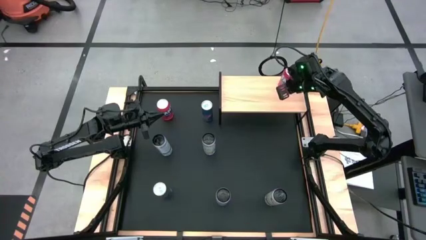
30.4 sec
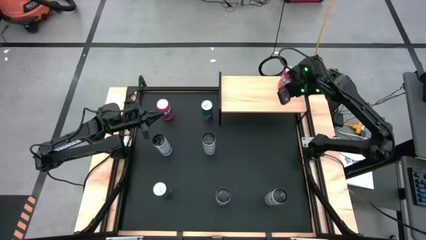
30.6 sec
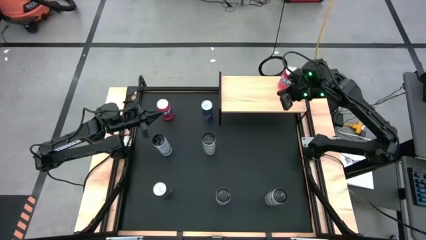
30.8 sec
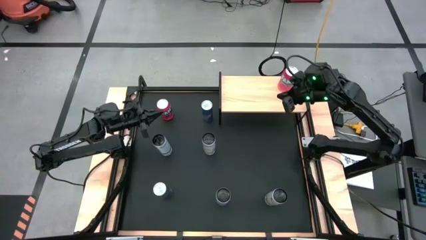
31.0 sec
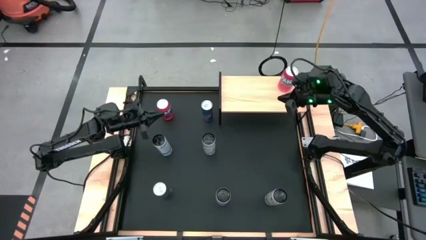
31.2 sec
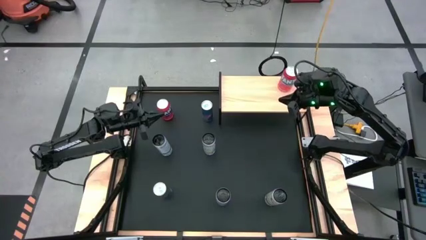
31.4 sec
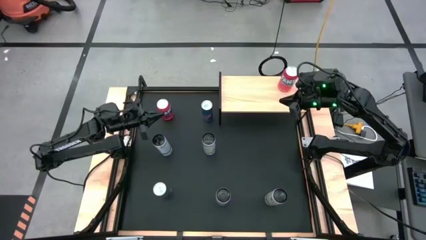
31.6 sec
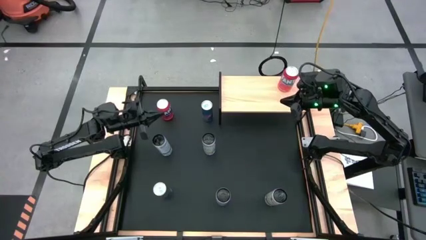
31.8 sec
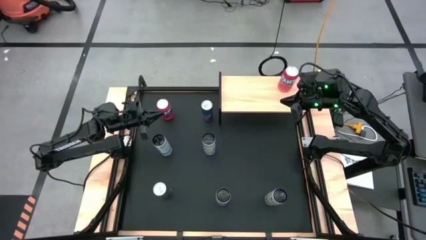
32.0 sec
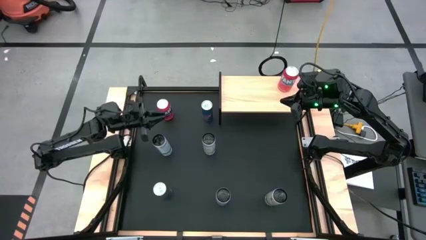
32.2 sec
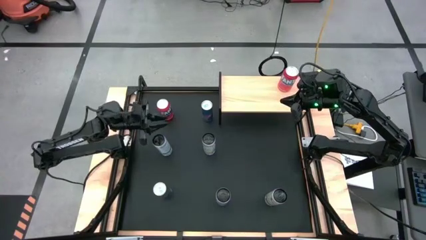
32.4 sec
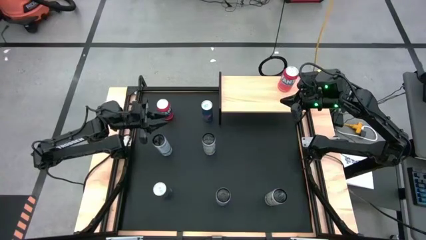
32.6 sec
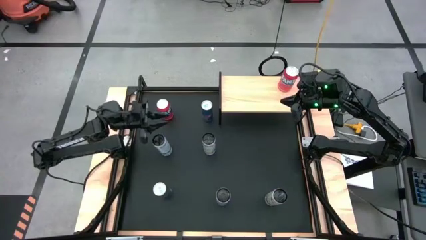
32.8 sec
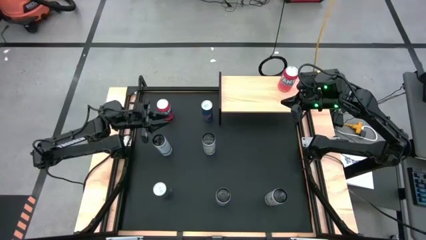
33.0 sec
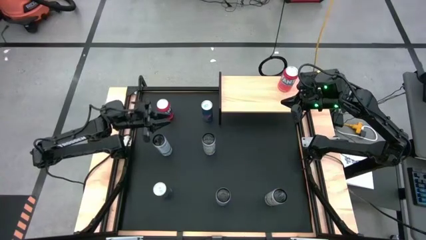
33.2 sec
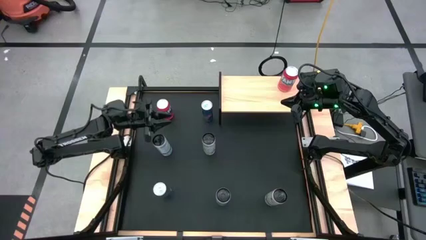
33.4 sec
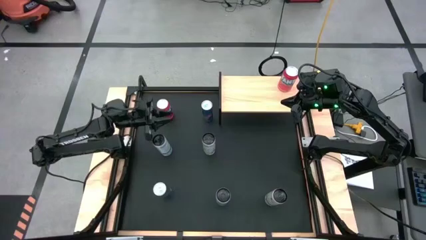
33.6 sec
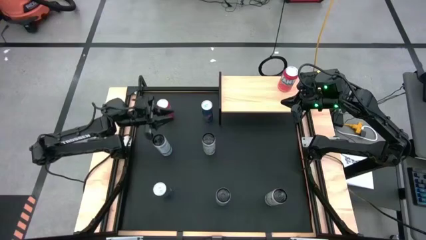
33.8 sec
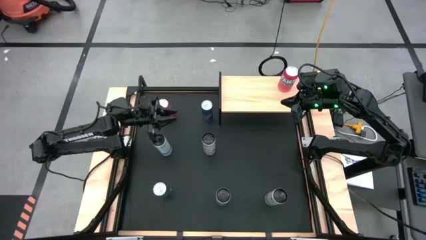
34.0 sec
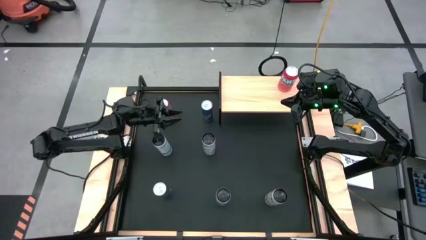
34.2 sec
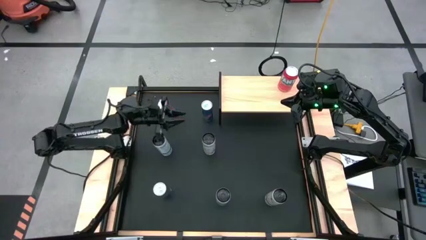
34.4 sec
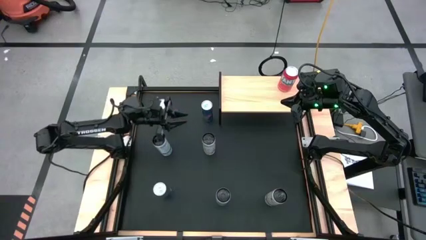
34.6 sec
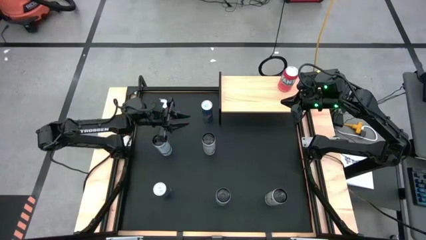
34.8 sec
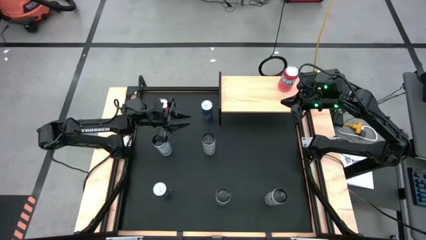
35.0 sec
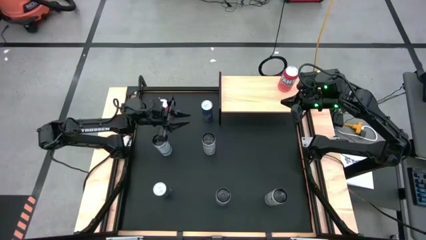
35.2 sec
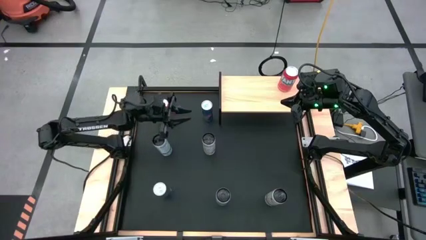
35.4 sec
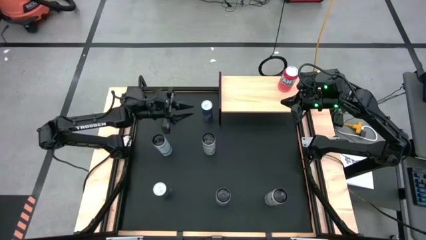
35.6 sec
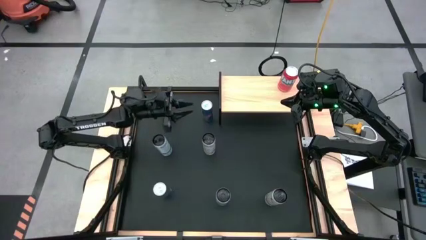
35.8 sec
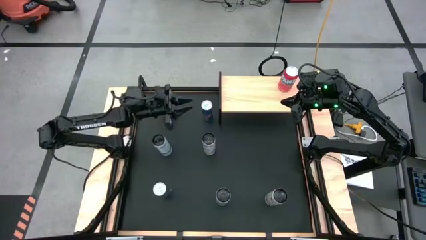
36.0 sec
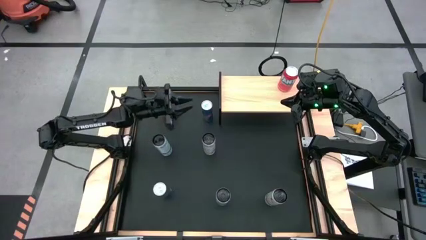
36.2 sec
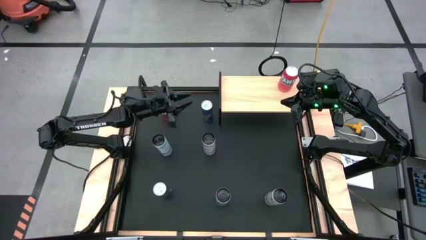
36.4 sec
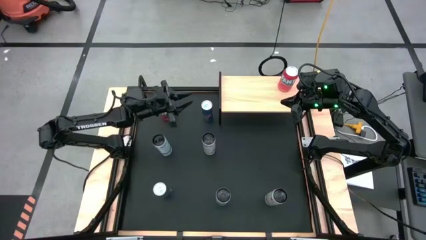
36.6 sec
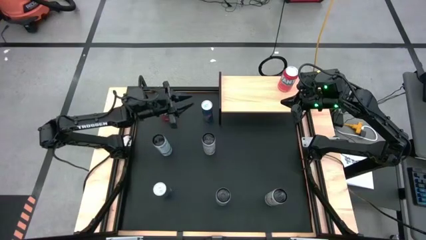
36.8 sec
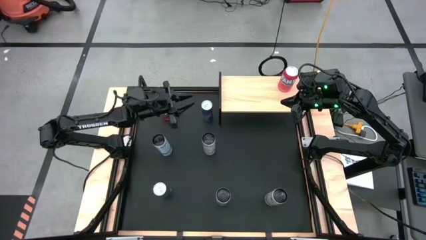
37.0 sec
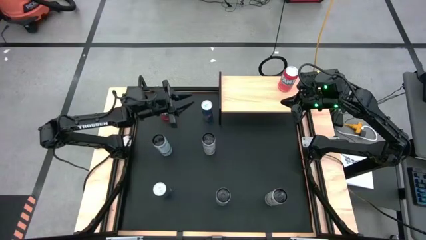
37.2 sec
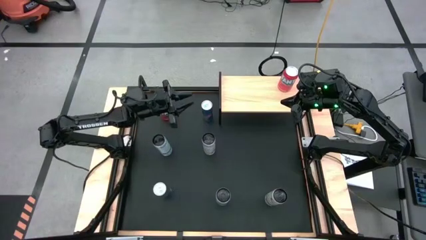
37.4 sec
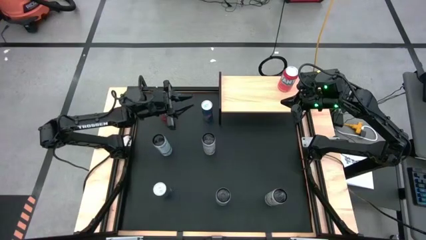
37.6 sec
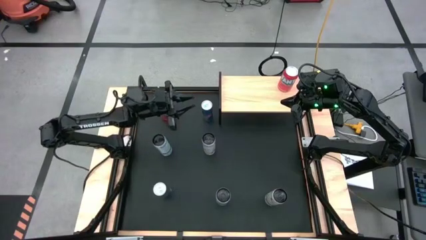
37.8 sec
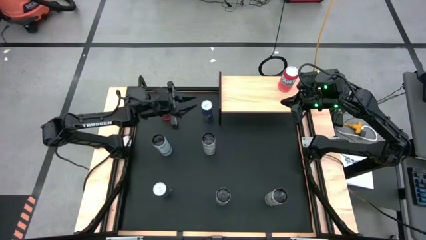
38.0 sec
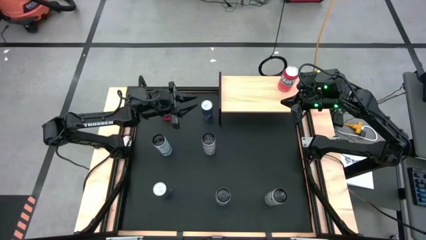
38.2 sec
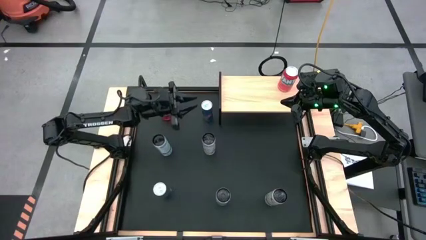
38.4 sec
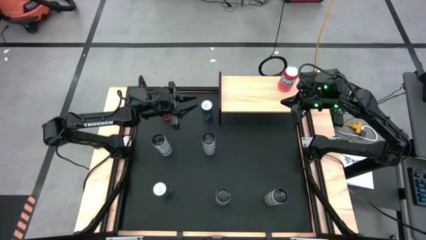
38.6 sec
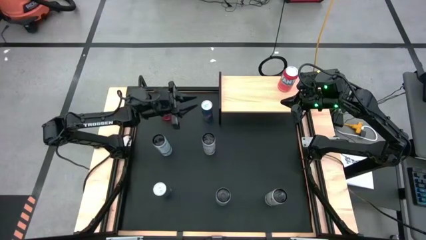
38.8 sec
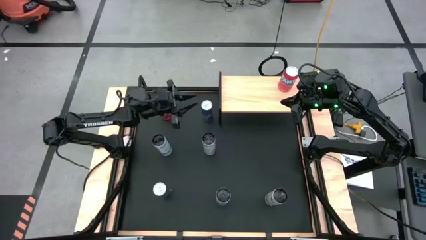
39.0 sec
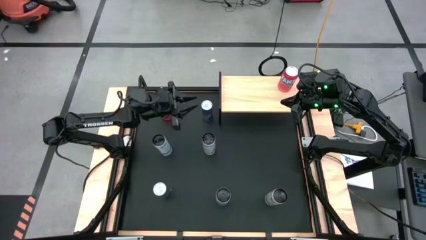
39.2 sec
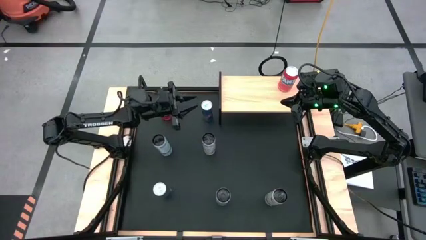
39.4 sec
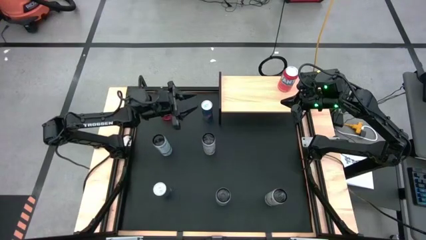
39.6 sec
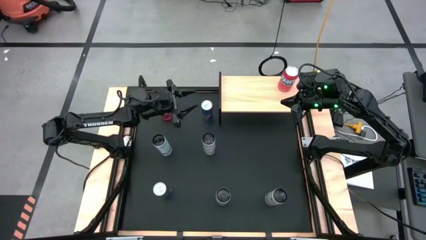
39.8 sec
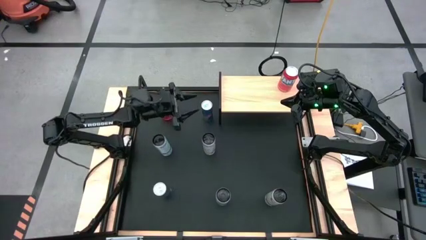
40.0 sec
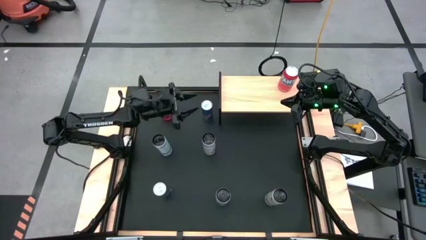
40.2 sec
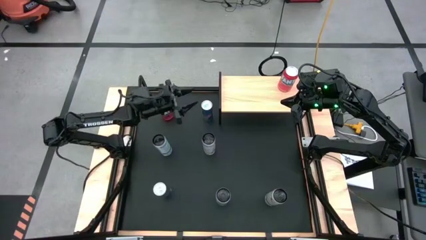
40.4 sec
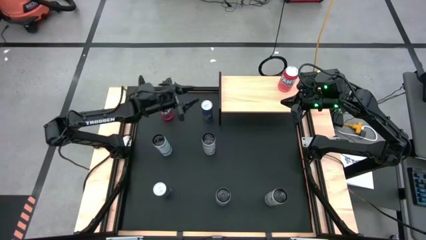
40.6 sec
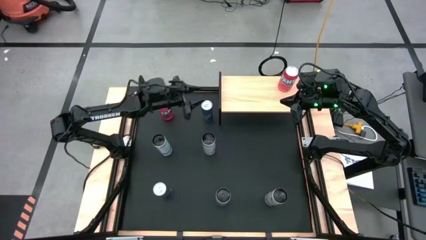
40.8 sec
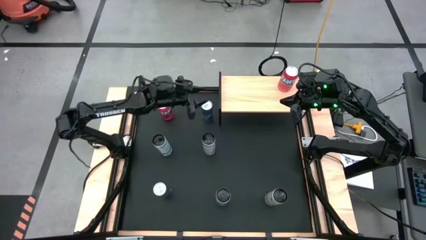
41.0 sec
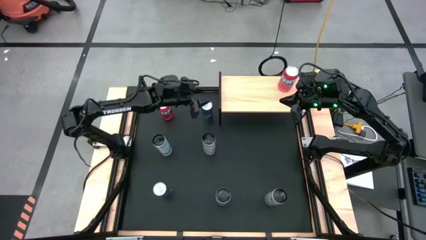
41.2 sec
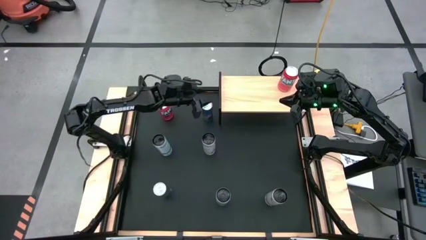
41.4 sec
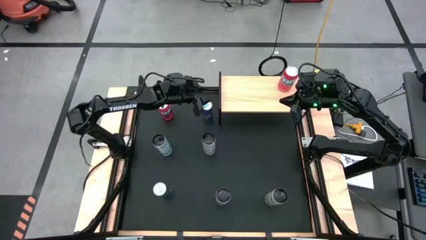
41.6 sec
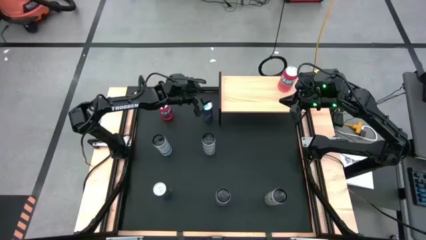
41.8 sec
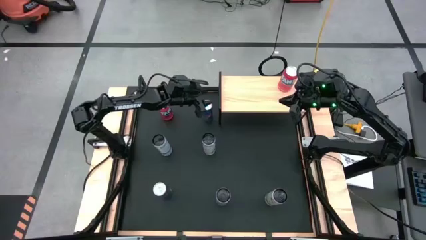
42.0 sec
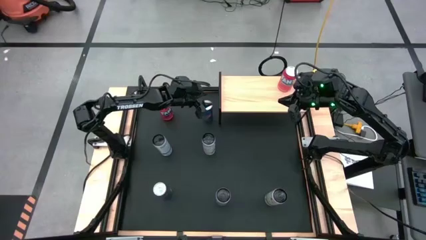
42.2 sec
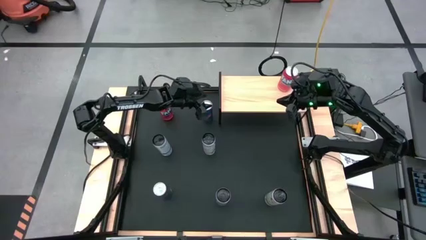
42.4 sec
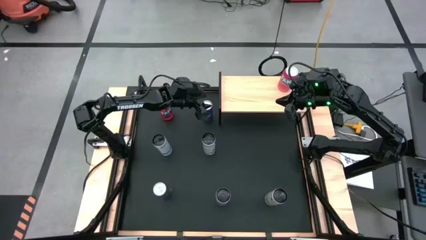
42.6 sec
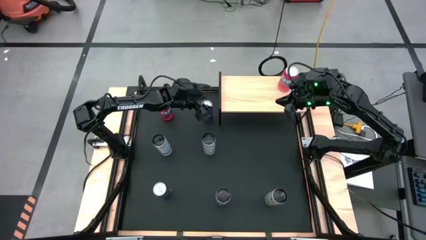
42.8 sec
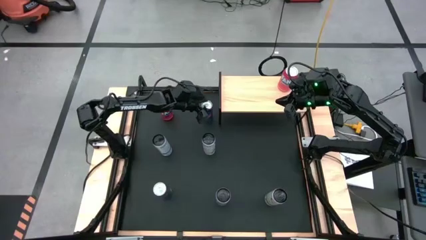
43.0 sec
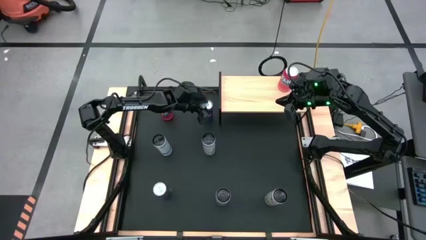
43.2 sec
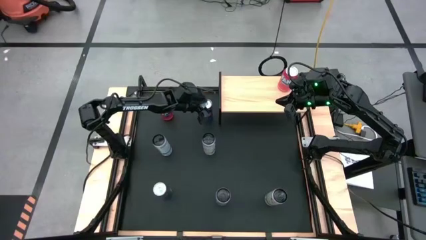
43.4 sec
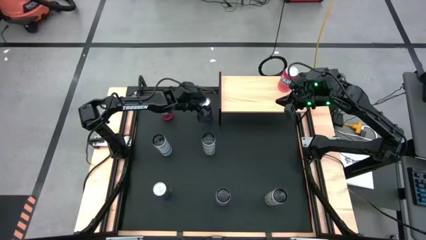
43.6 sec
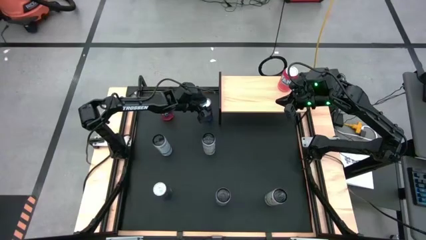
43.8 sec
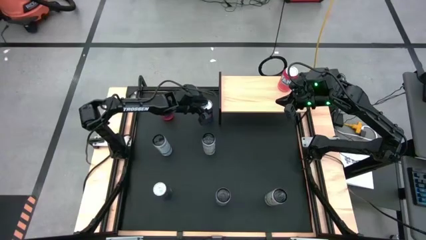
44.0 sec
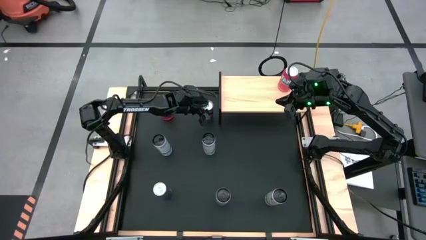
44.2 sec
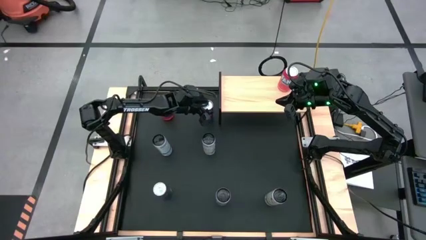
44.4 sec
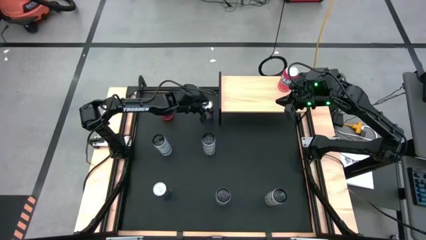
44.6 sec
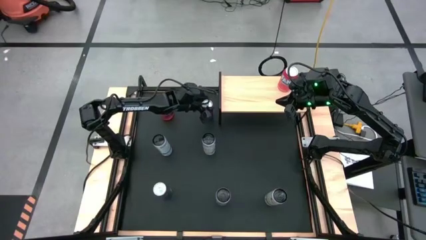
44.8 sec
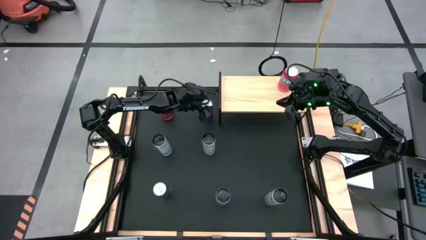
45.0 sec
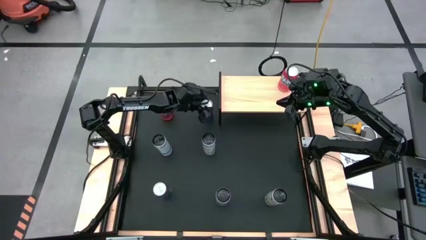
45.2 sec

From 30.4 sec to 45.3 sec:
Task: Place canned beverage on shelf
Put the top blue soda can on the shelf
